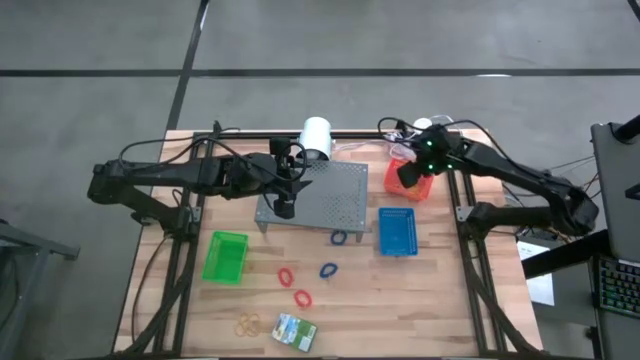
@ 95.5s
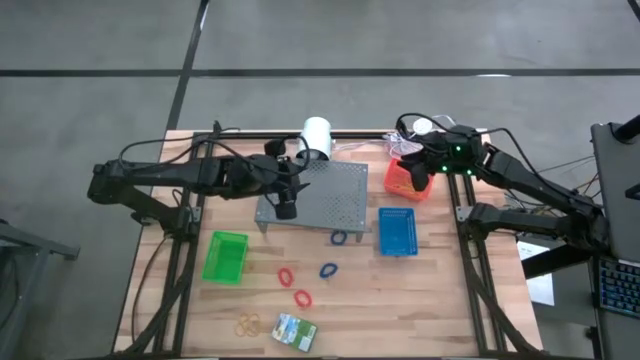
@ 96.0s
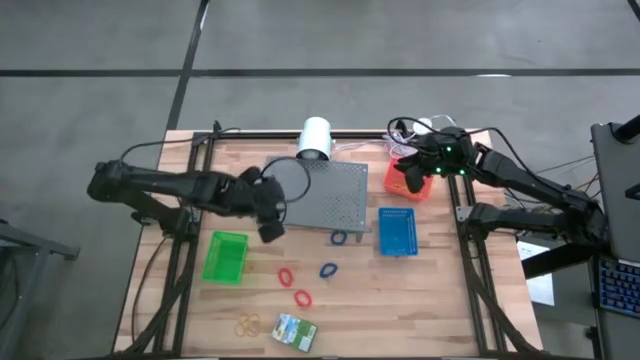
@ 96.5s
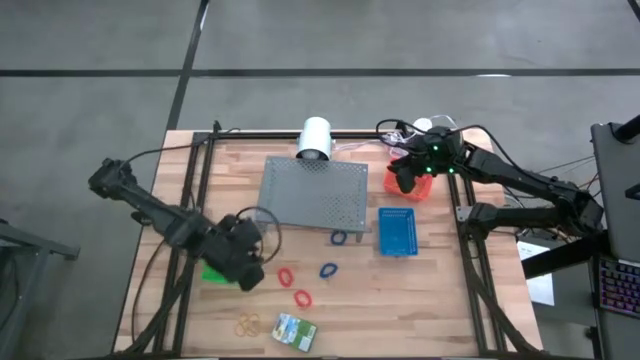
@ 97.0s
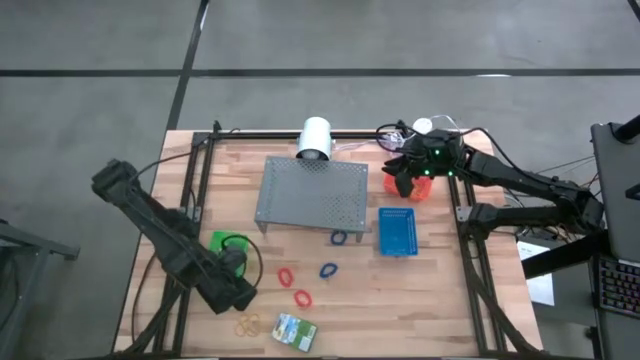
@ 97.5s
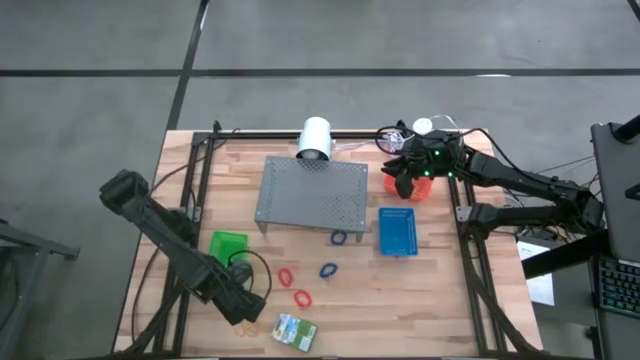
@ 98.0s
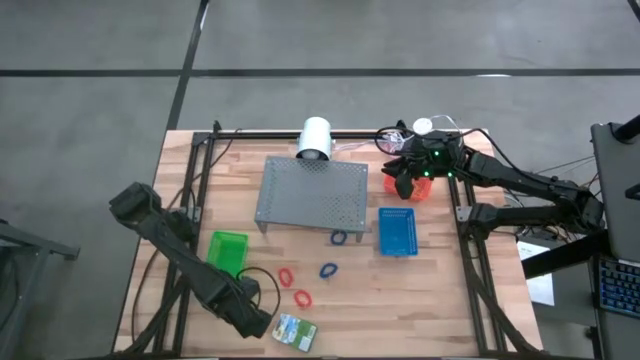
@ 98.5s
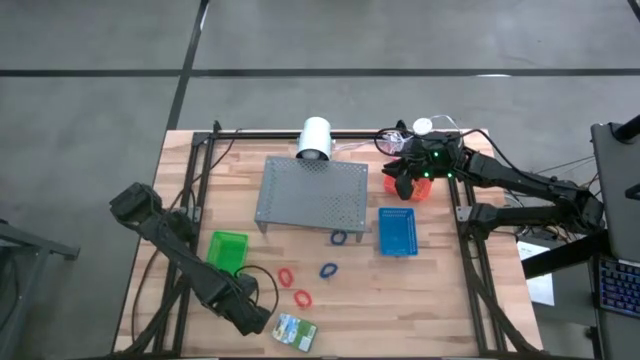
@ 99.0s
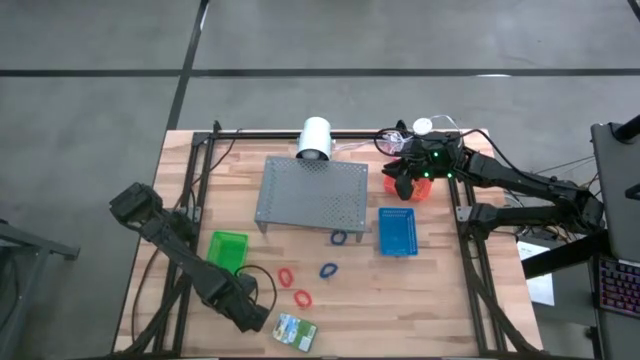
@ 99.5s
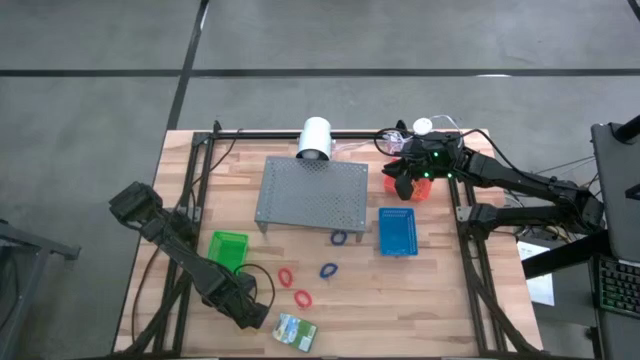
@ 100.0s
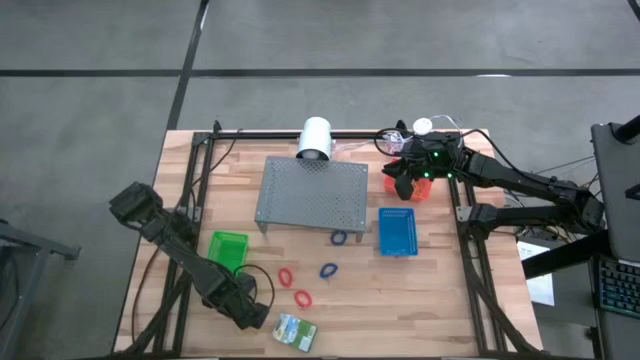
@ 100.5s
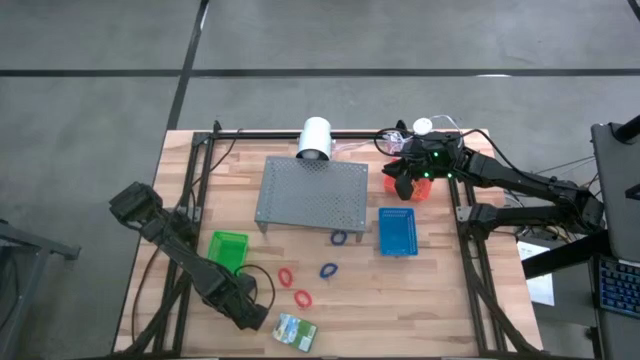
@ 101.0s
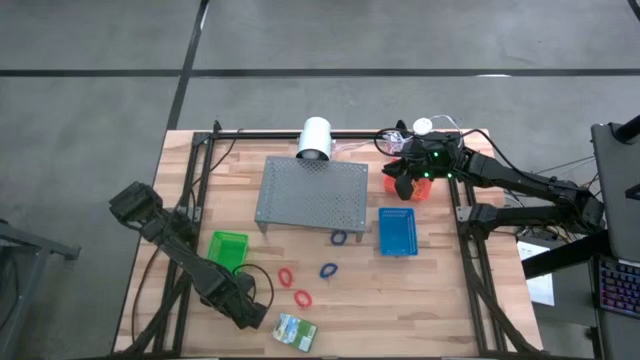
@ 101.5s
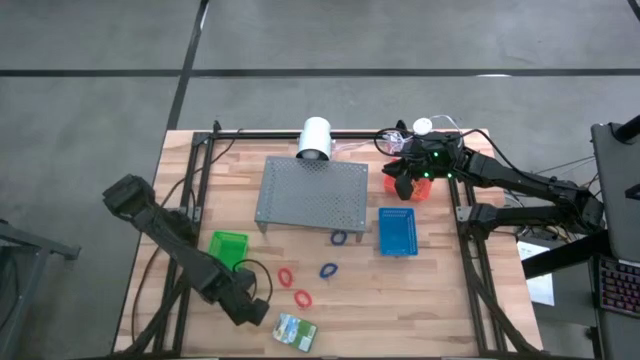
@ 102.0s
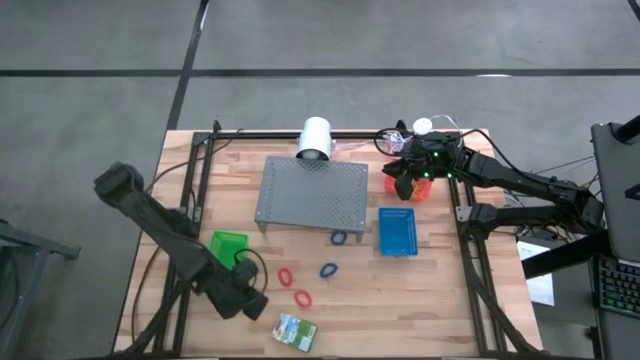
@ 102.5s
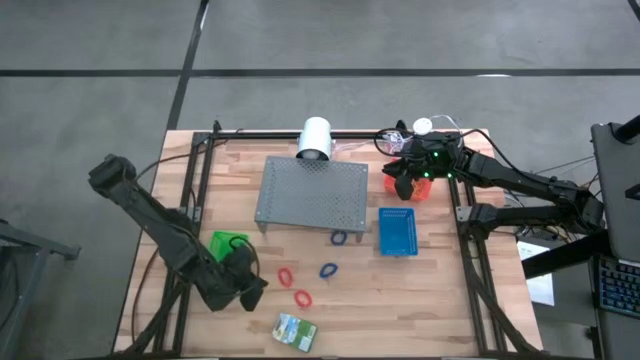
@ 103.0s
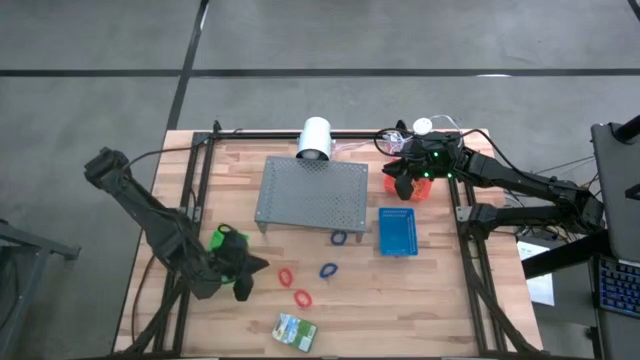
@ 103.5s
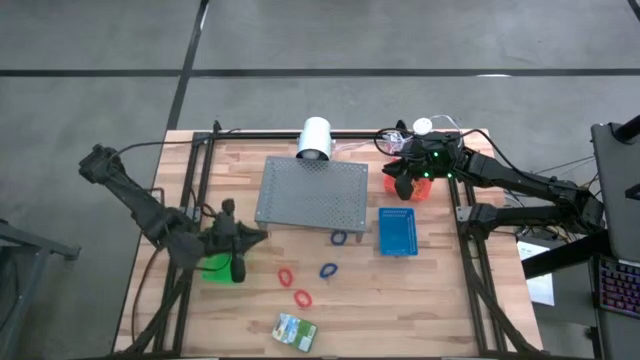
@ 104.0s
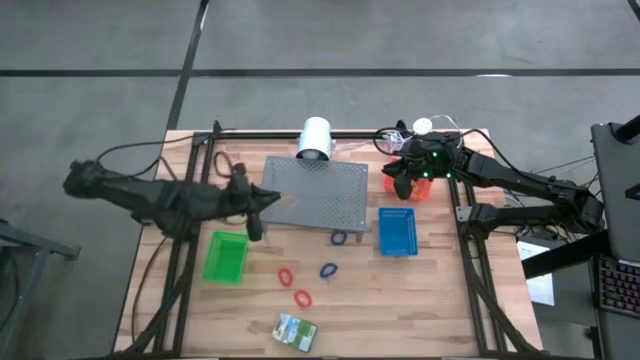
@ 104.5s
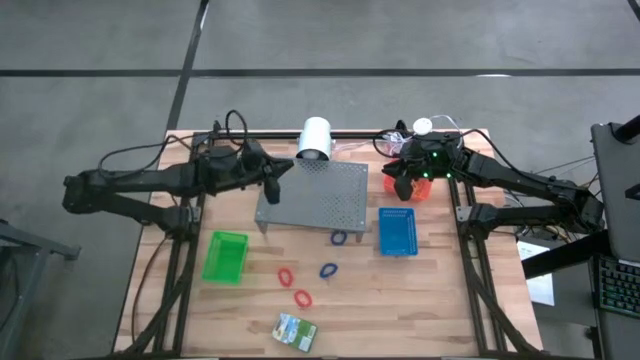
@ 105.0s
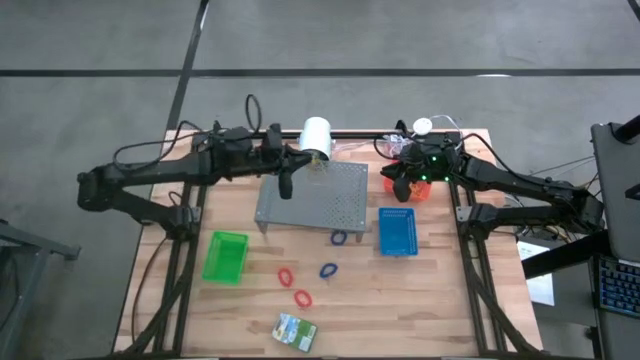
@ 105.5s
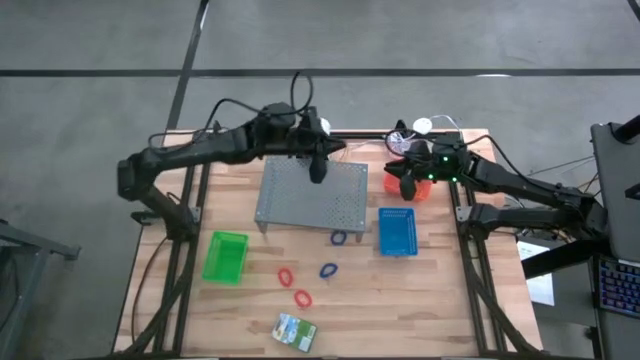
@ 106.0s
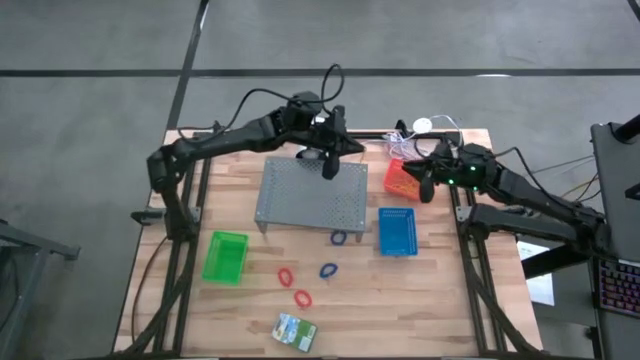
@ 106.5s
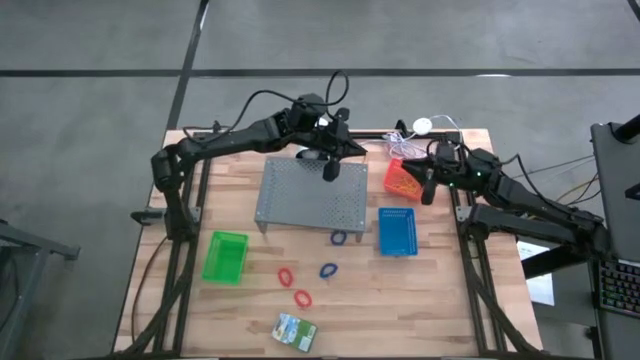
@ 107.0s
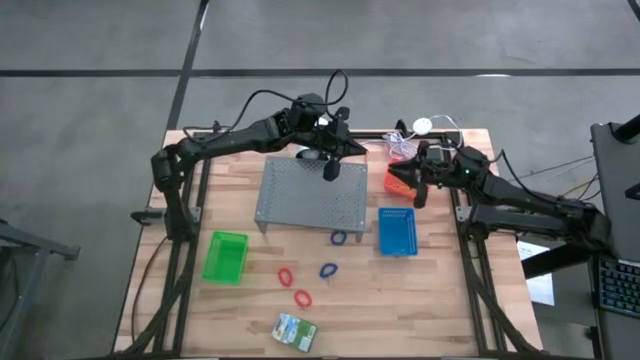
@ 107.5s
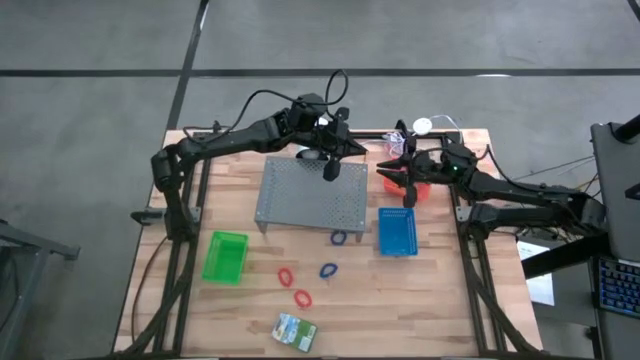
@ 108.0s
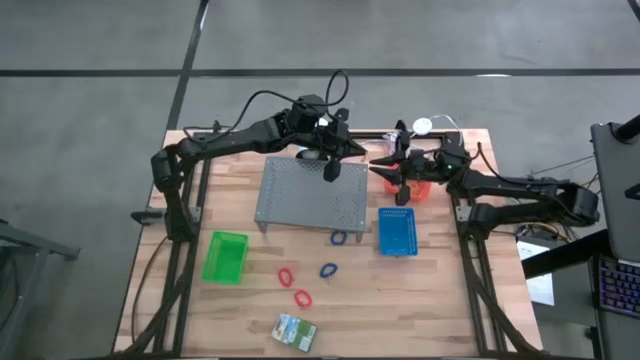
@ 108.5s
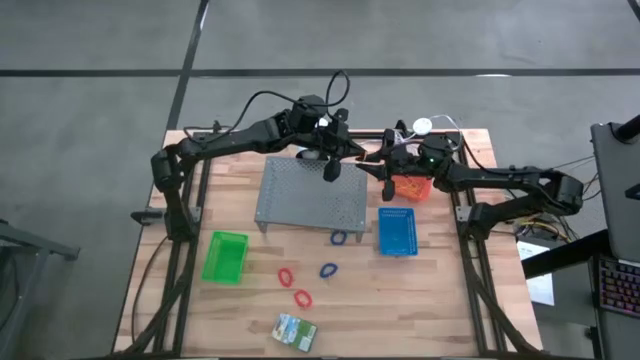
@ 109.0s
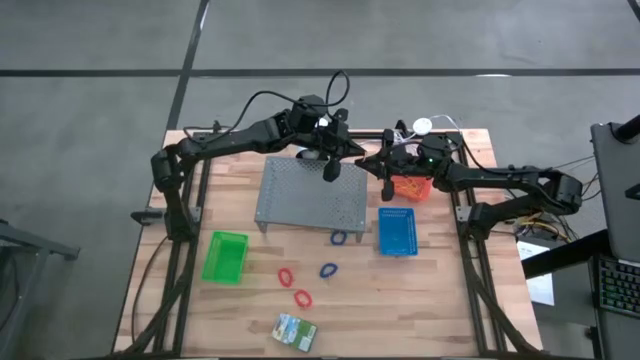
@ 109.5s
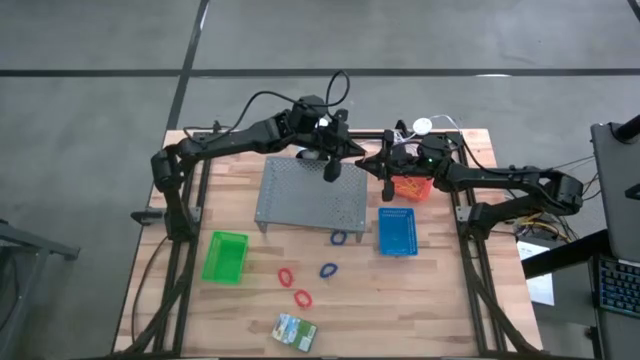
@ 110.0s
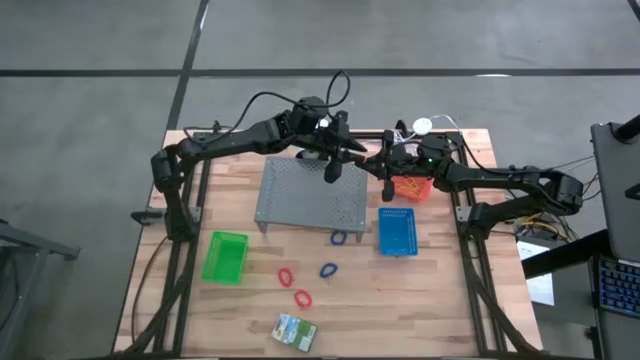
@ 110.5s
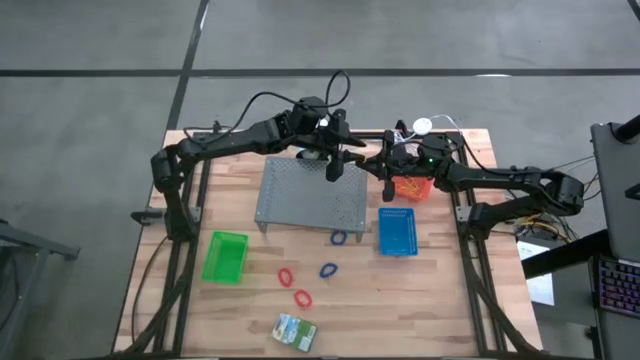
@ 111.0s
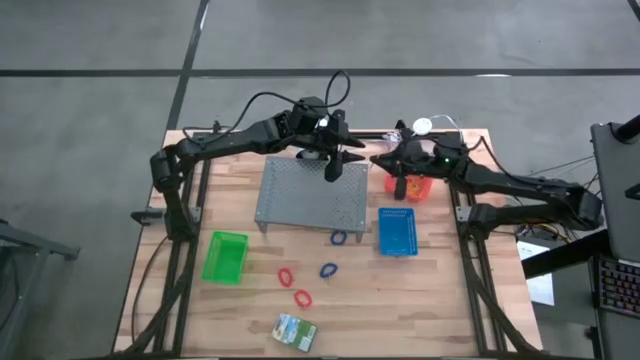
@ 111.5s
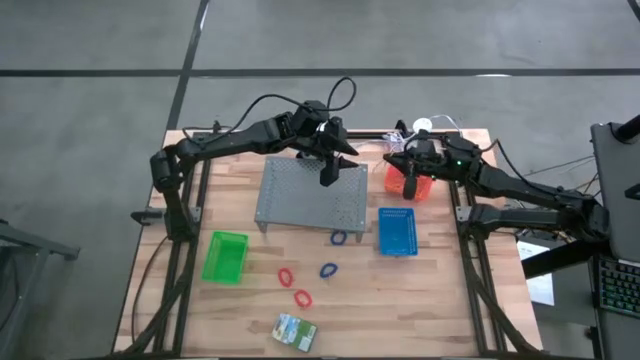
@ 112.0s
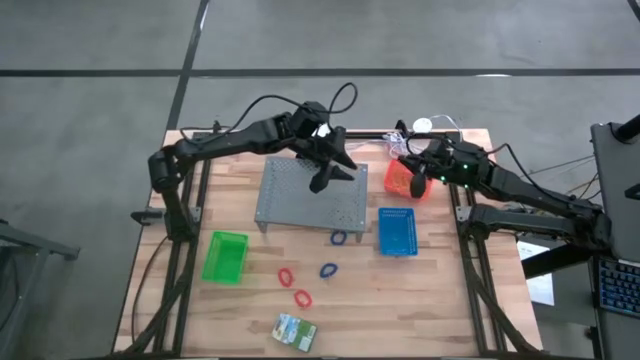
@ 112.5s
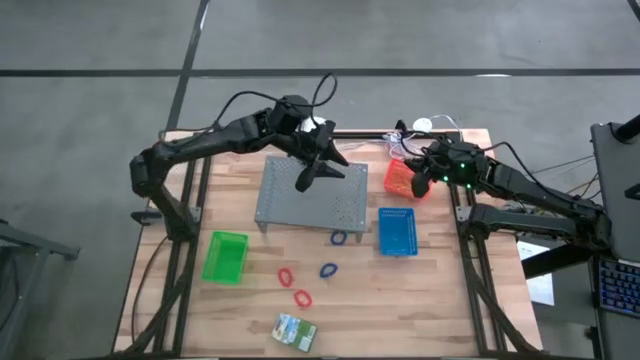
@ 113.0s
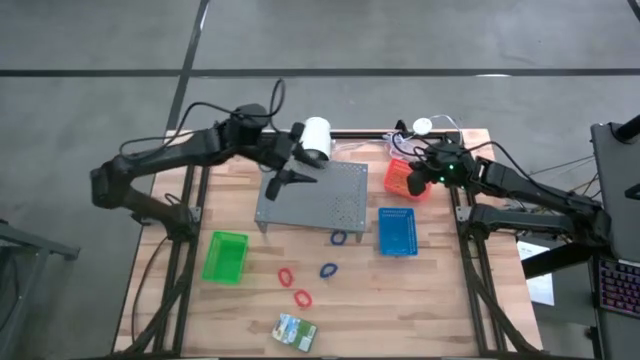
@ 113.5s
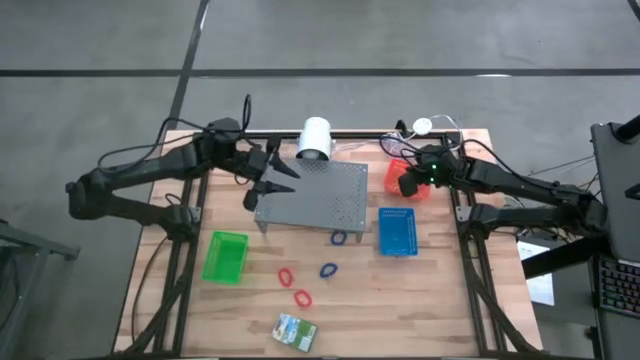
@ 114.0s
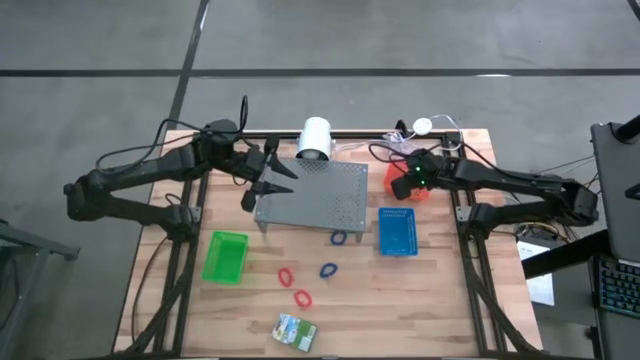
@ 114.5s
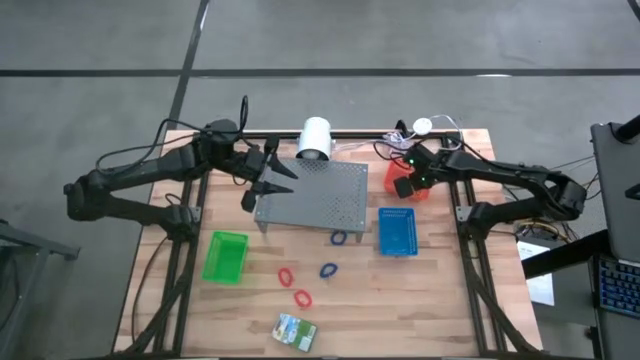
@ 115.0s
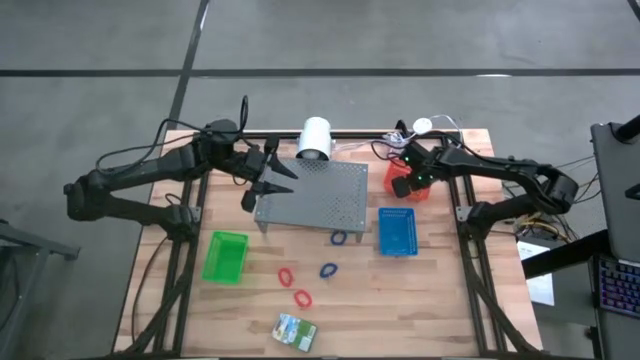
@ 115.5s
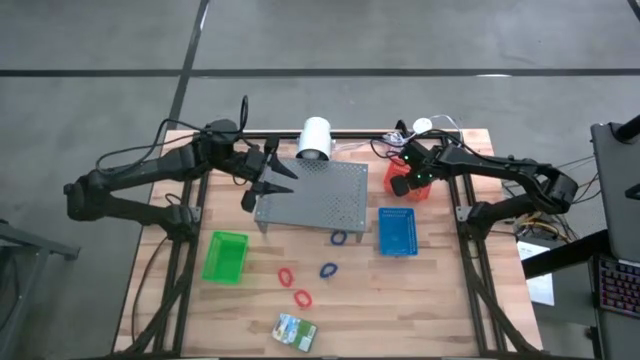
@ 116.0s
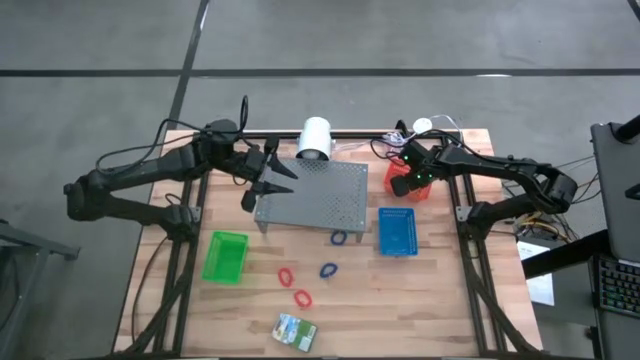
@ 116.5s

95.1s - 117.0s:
Task: Pick & Place Office Desk Supplies
Put the yellow rubber band into the orange bin
